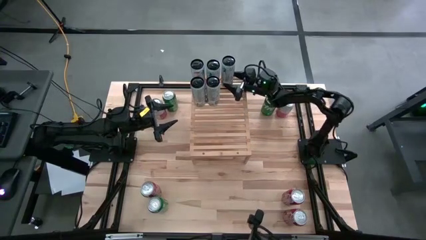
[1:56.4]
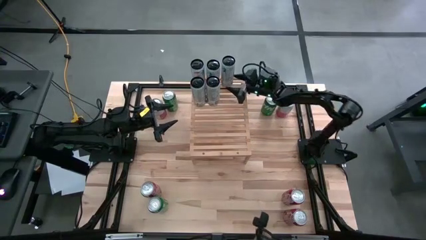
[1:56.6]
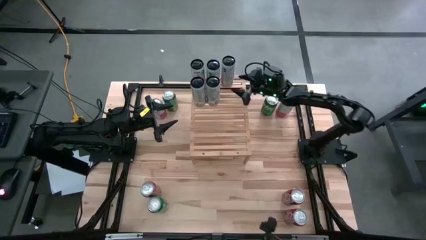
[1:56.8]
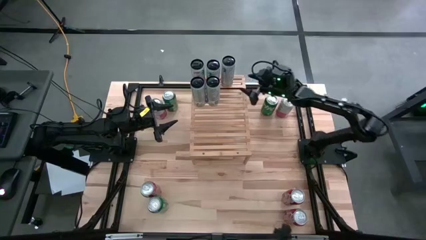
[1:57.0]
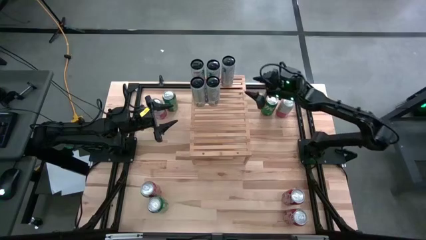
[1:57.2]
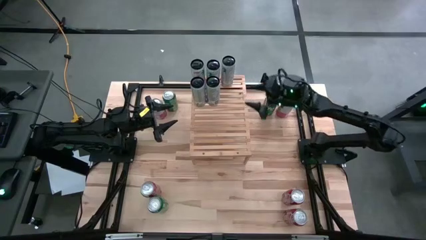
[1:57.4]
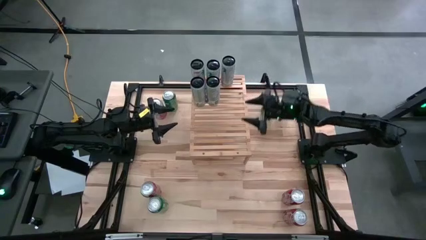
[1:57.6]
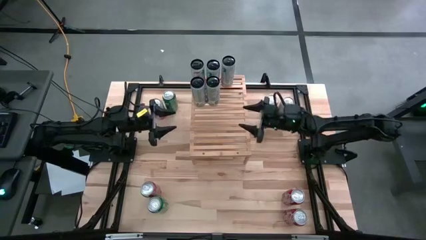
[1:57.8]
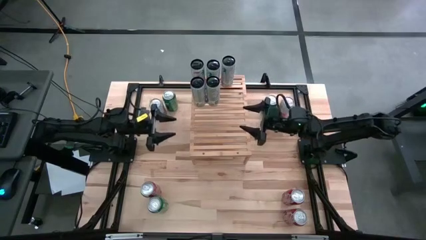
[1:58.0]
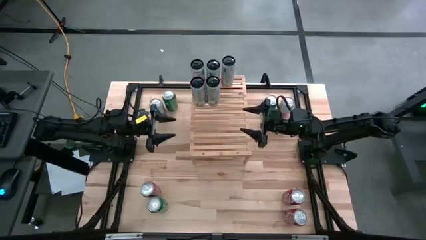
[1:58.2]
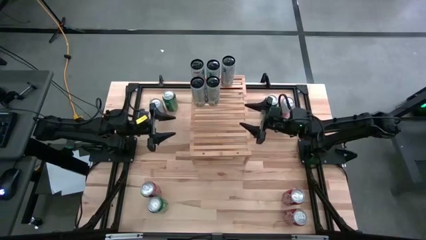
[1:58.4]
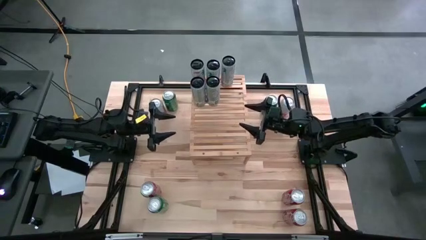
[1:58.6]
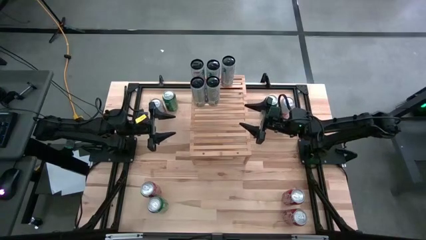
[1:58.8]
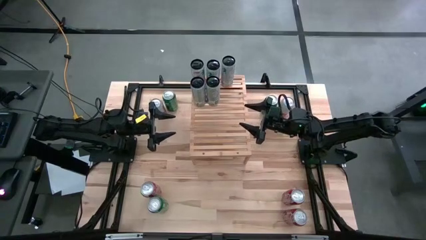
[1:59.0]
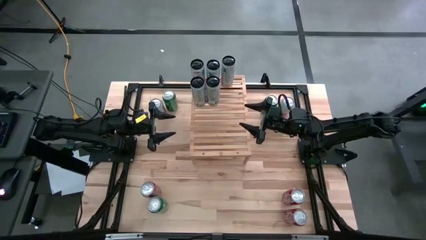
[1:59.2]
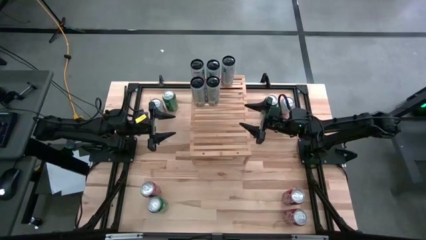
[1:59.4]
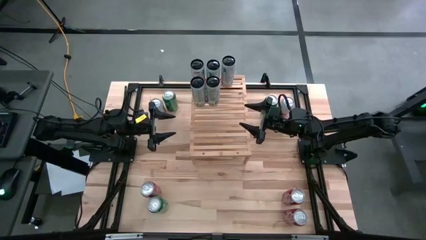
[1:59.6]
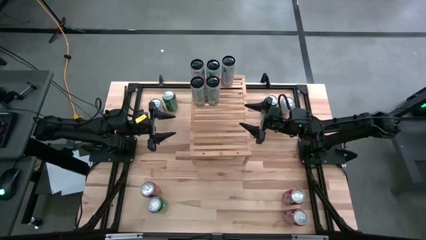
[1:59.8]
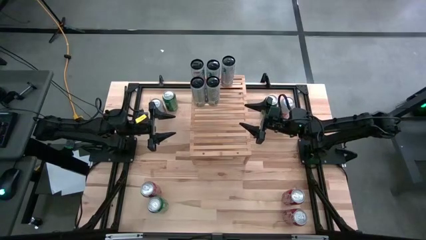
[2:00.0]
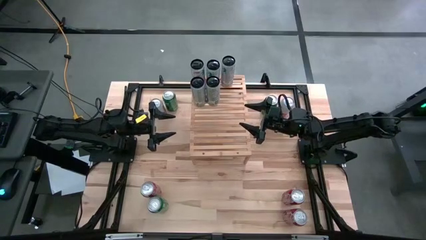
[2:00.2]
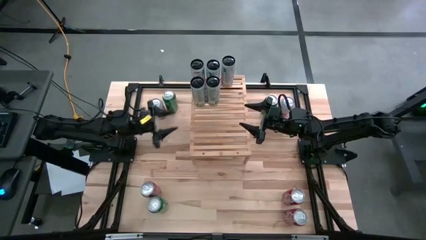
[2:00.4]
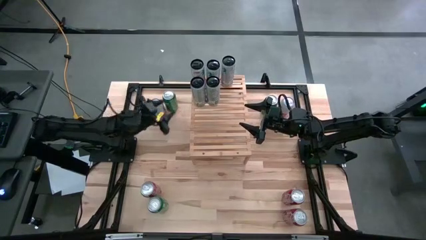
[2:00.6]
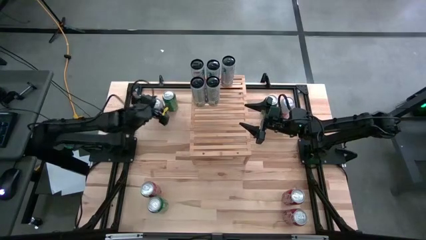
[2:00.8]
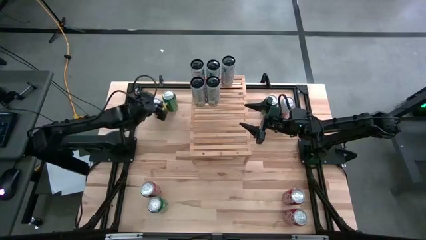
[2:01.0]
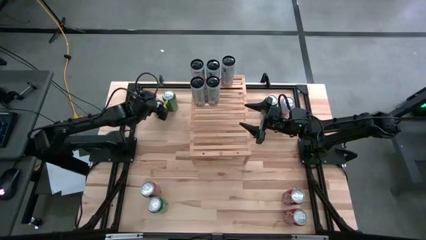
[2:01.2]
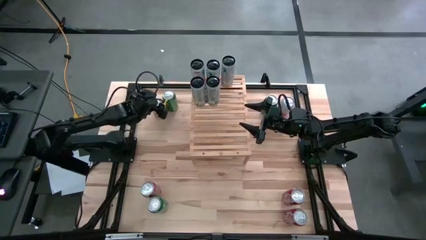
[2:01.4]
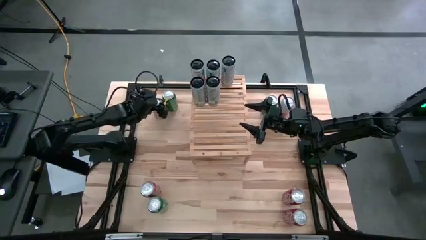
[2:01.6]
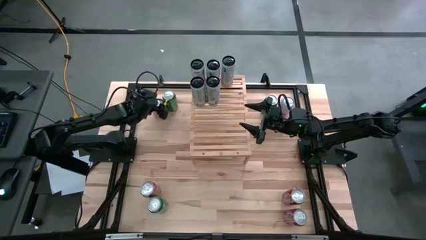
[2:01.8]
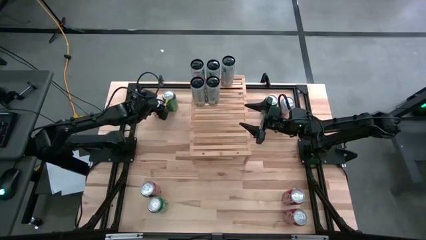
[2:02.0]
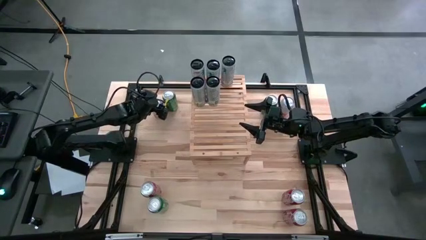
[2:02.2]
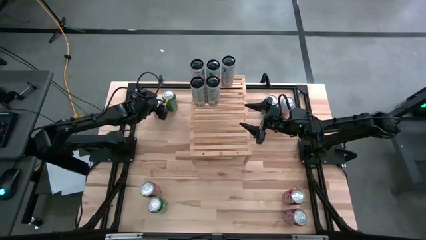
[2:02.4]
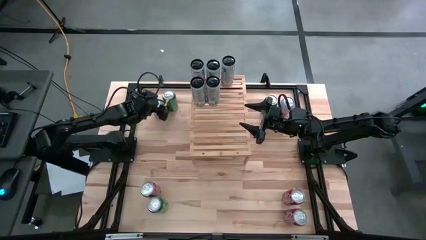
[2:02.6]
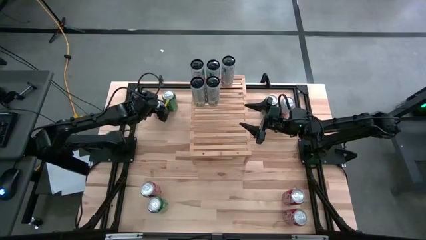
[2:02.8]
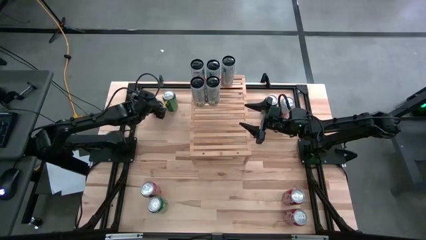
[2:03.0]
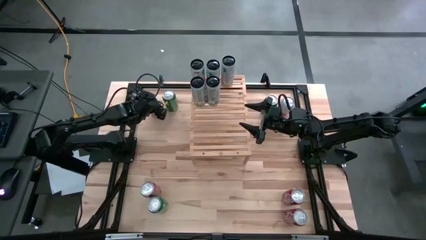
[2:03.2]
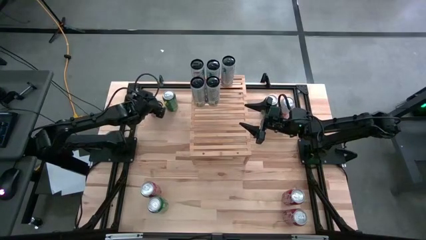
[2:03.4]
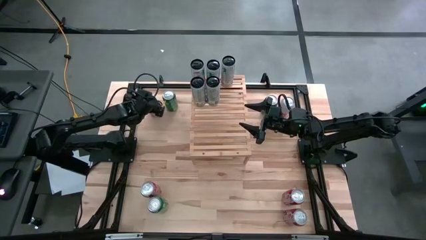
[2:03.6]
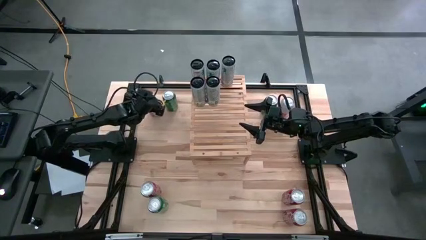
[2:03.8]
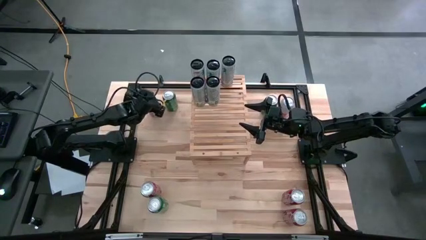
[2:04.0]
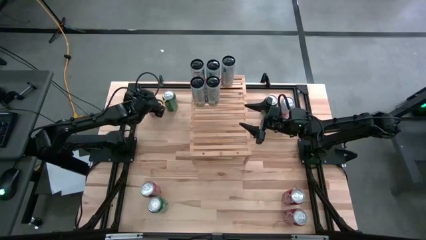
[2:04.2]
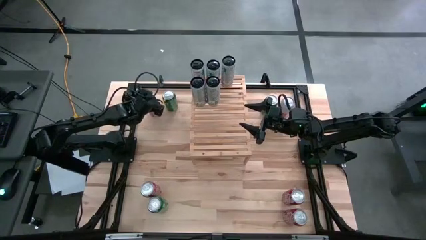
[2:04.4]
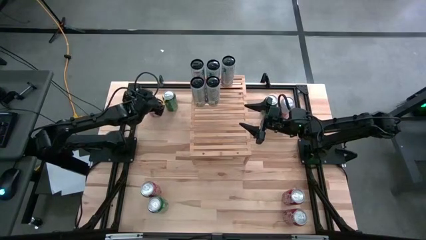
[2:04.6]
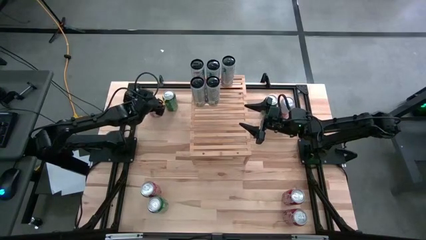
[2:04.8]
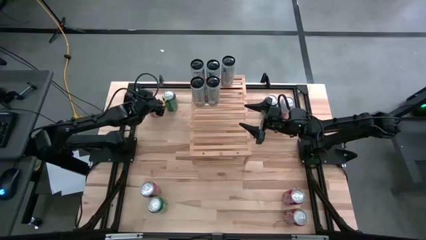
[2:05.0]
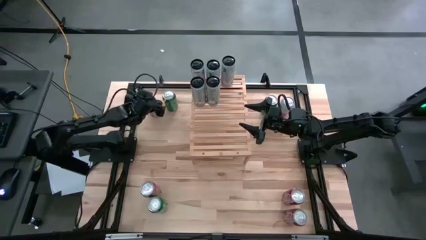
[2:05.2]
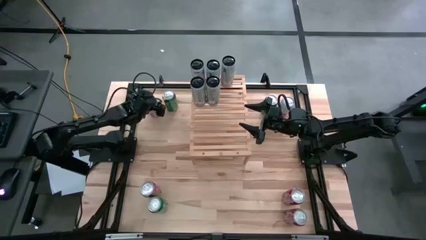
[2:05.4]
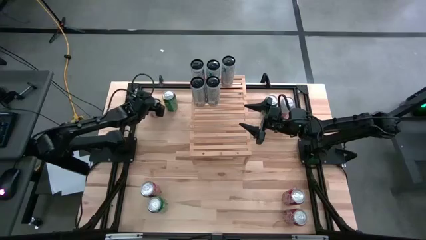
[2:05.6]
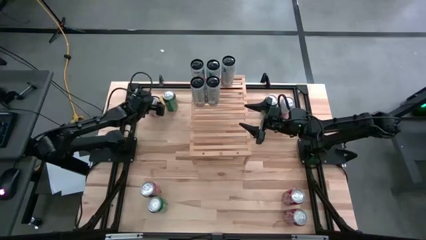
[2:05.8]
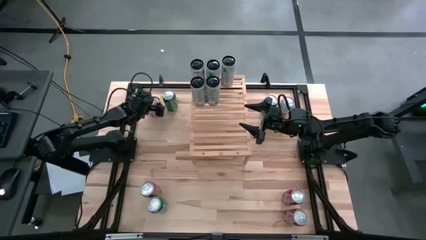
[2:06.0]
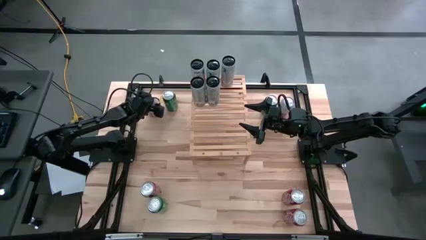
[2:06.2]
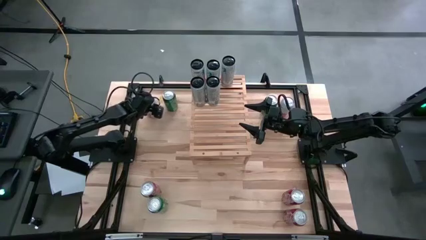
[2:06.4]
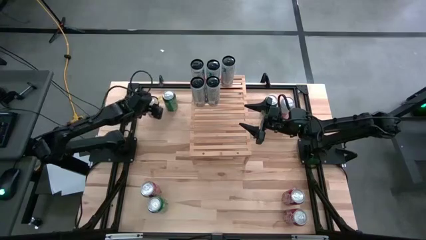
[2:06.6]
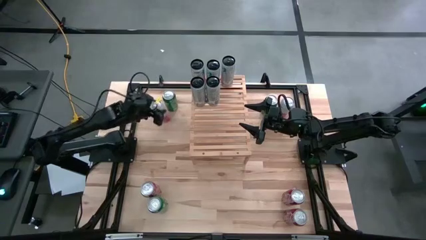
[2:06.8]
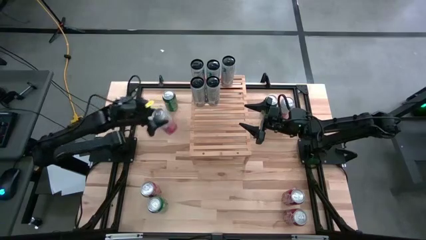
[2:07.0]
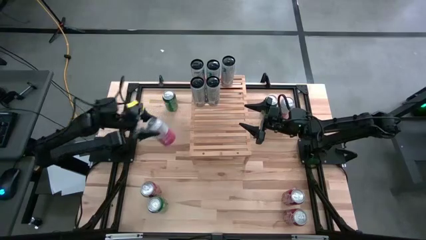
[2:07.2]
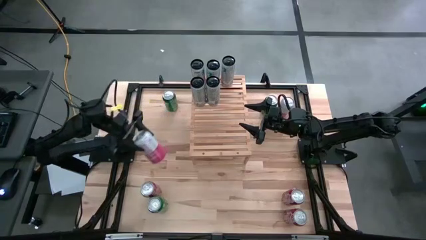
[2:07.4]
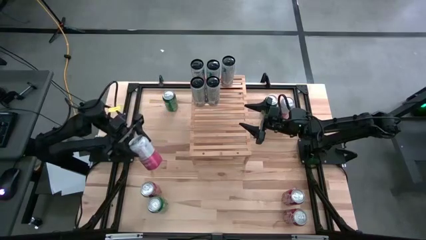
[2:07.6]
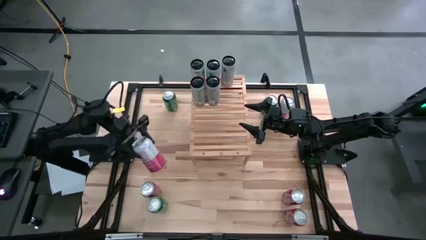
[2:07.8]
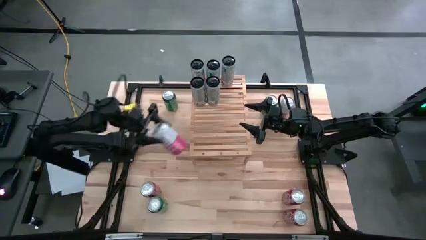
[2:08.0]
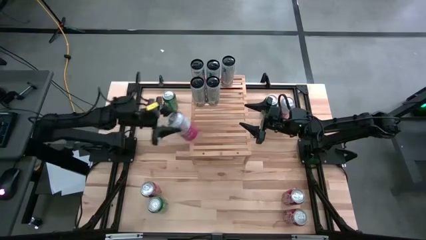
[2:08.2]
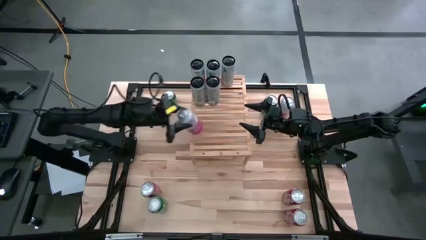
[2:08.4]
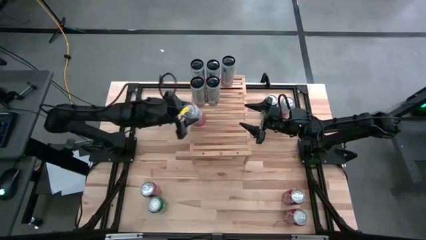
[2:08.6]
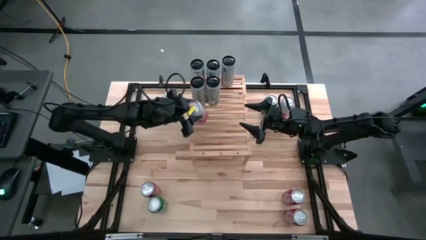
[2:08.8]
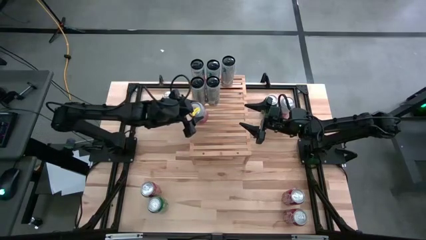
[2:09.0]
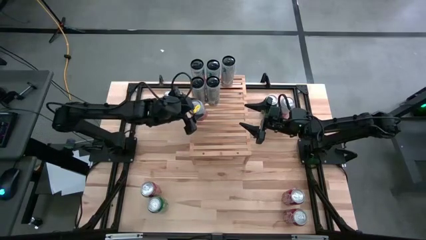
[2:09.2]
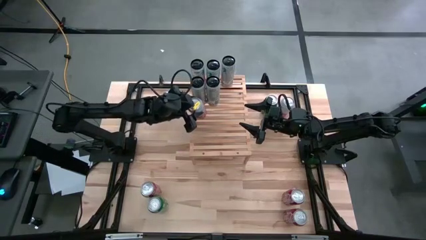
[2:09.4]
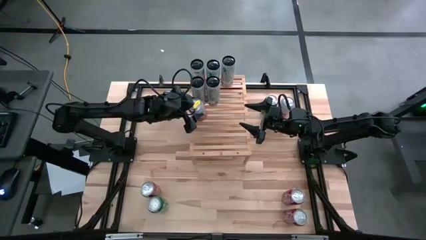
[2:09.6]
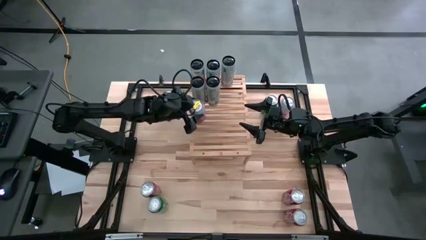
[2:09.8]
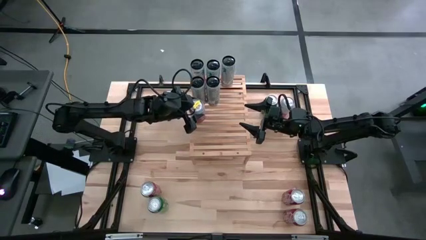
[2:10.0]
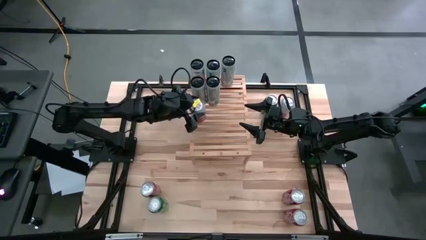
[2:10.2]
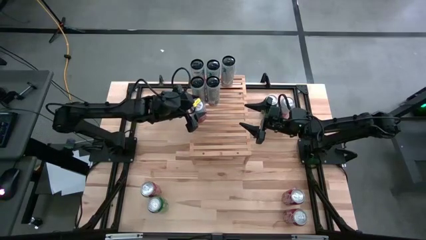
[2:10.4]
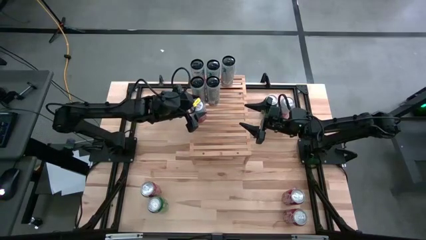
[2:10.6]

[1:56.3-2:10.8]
Task: Place canned beverage on shelf
Put the left white and pink soda can on the shelf

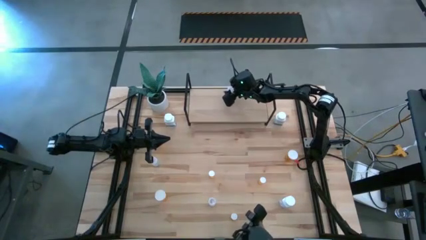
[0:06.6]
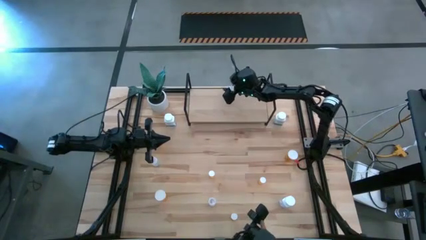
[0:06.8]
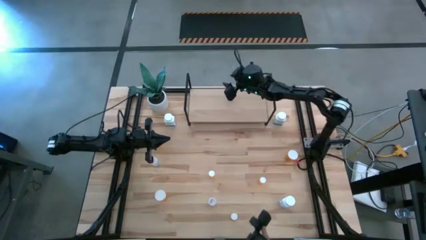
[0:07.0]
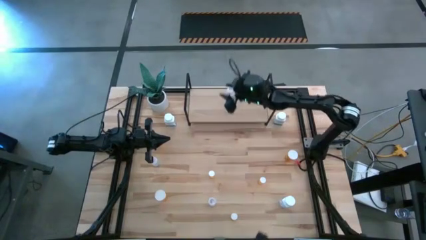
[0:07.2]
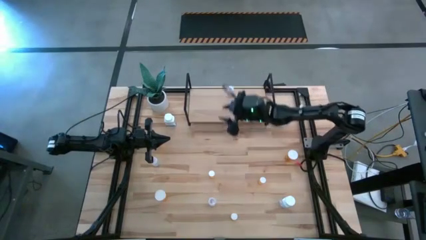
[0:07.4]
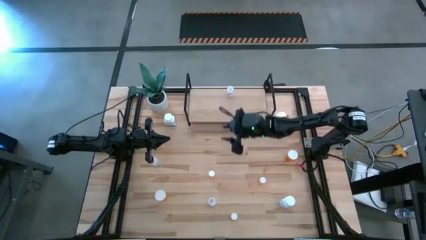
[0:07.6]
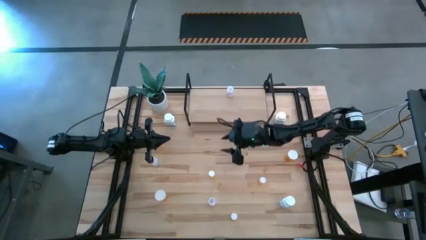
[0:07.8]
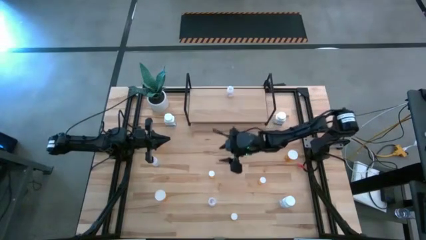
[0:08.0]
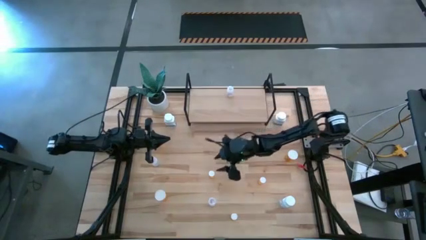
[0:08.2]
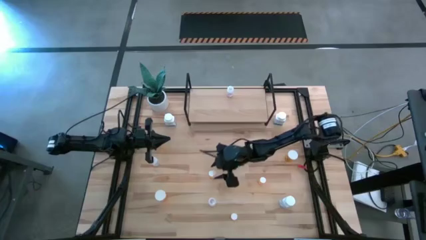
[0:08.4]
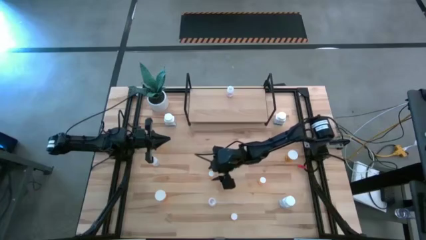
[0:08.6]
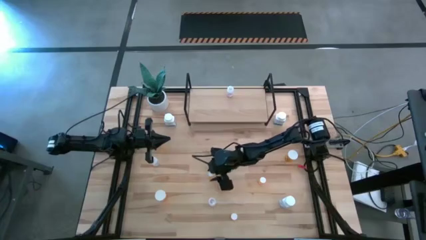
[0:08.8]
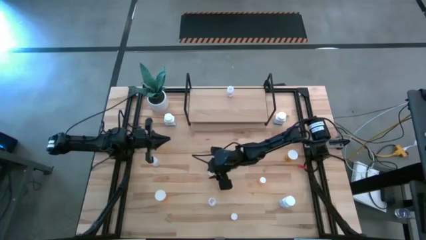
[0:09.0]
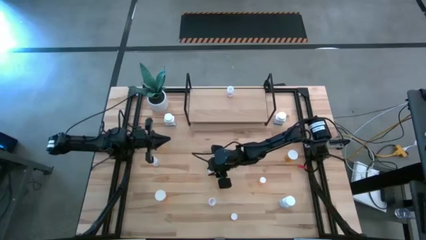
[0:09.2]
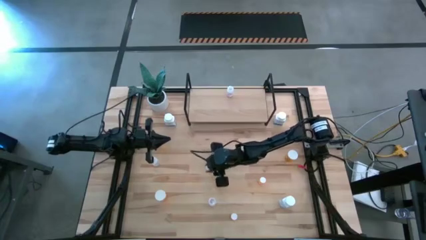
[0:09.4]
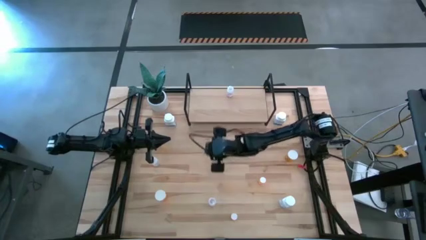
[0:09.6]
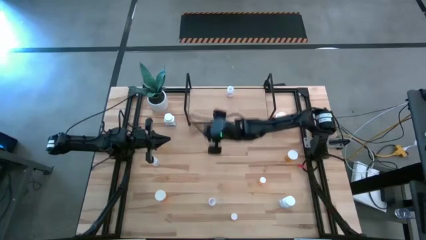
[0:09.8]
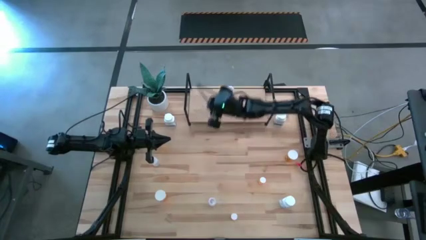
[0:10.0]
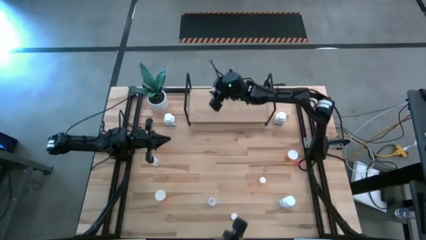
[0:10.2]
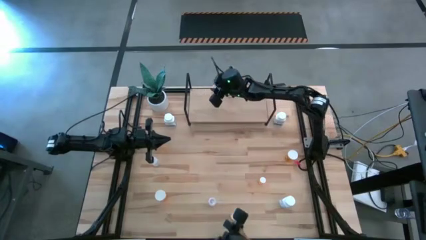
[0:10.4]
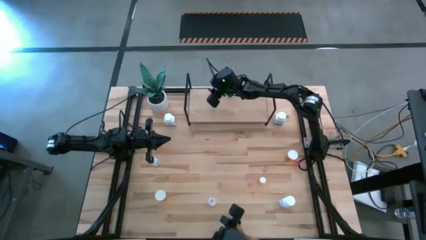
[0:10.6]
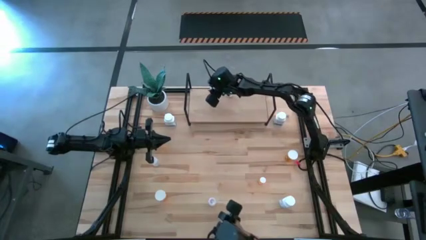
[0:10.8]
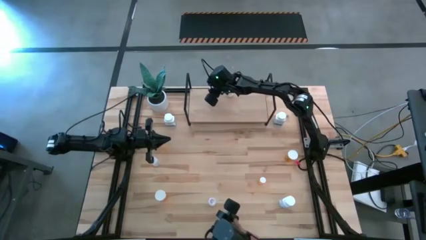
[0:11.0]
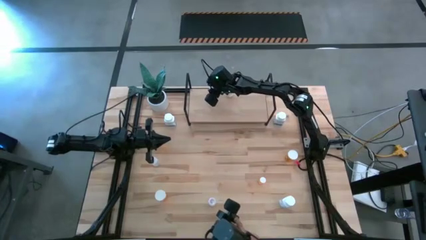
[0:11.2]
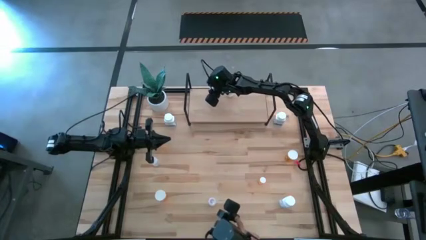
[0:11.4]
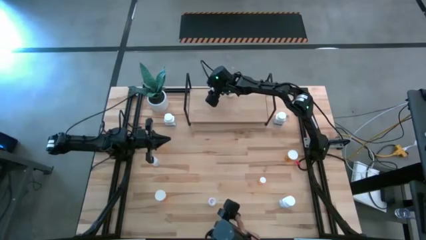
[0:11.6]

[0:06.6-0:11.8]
Task: Pick and place medicine bottles onto shelf by color
Put the top left small orange pill bottle on the shelf
